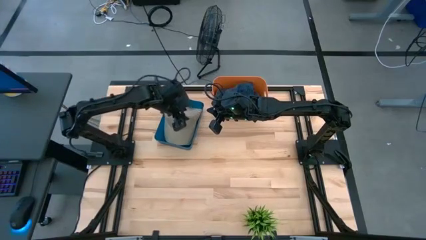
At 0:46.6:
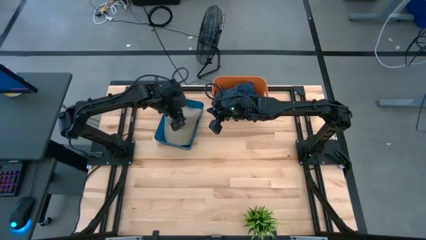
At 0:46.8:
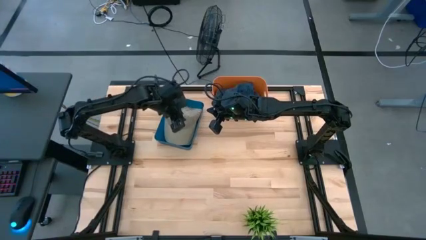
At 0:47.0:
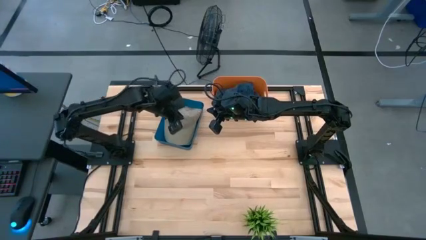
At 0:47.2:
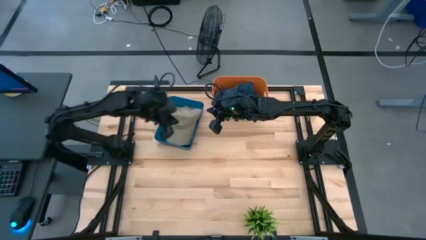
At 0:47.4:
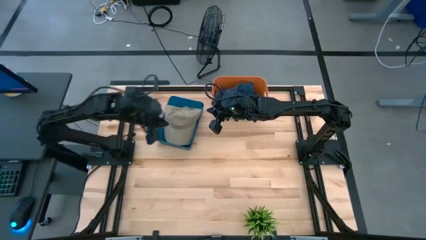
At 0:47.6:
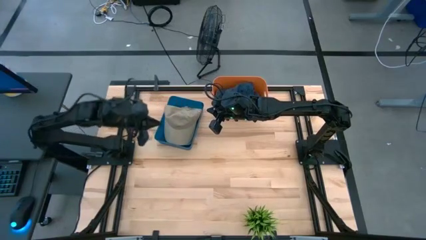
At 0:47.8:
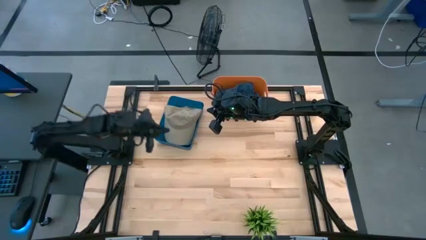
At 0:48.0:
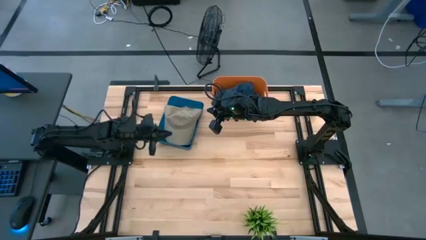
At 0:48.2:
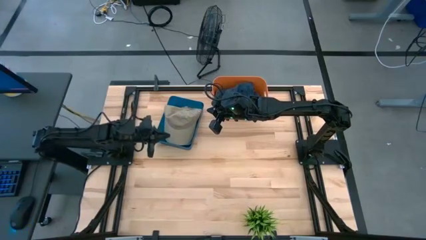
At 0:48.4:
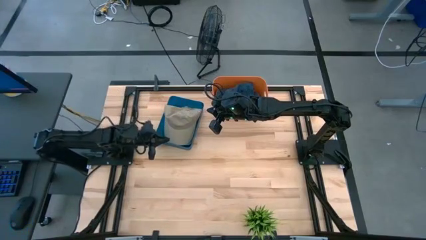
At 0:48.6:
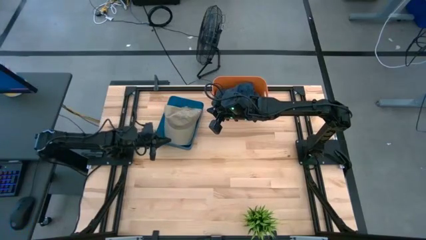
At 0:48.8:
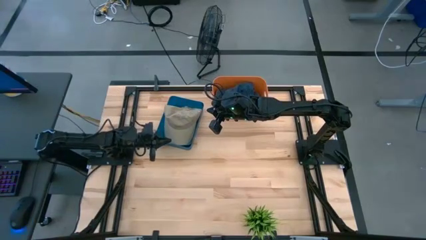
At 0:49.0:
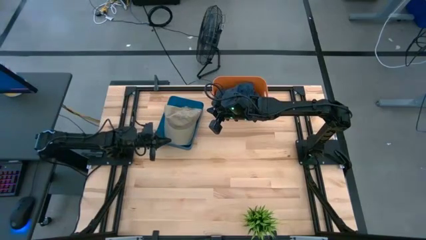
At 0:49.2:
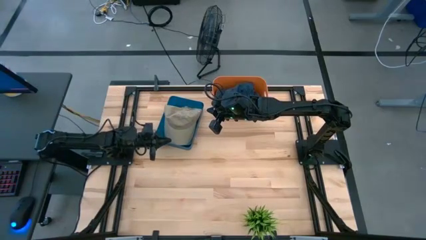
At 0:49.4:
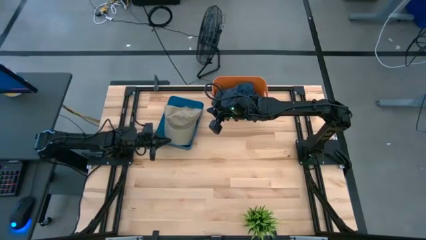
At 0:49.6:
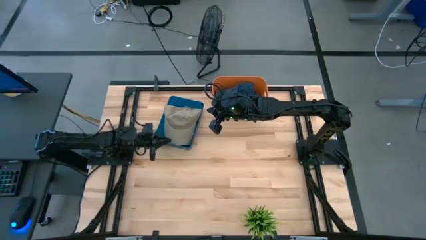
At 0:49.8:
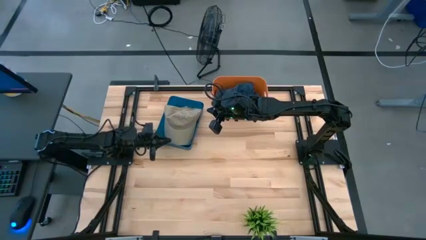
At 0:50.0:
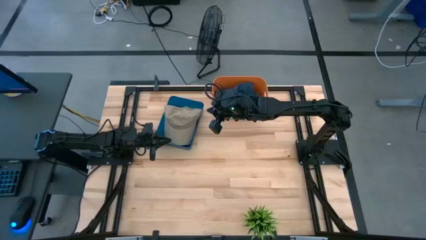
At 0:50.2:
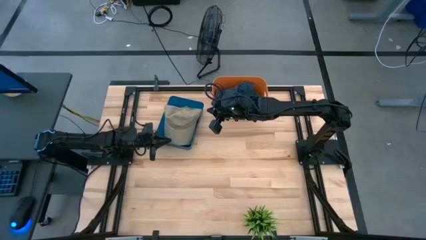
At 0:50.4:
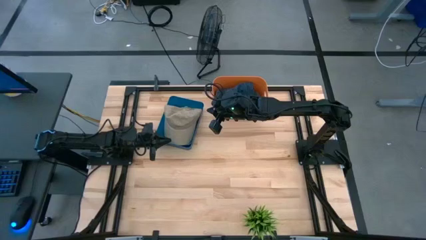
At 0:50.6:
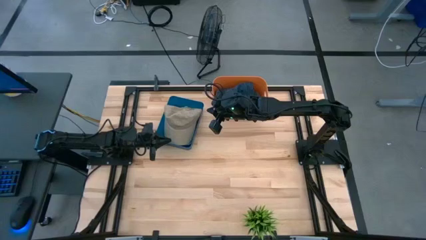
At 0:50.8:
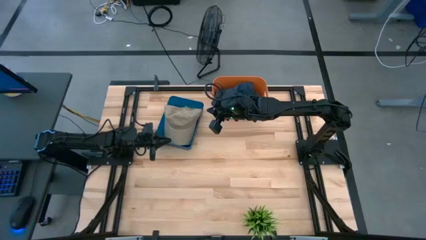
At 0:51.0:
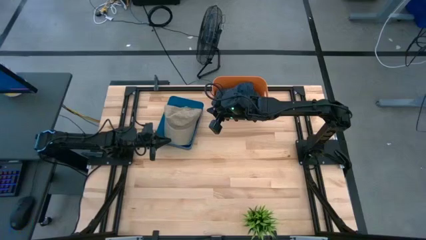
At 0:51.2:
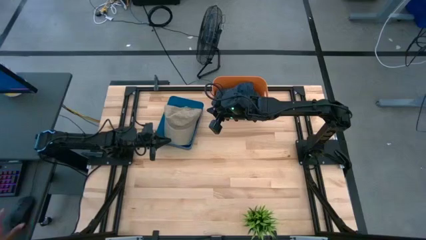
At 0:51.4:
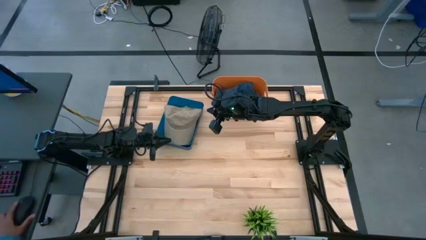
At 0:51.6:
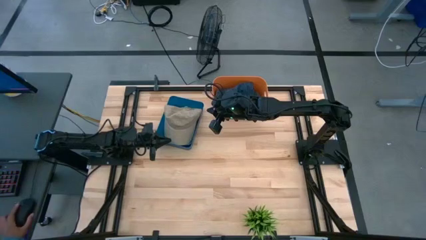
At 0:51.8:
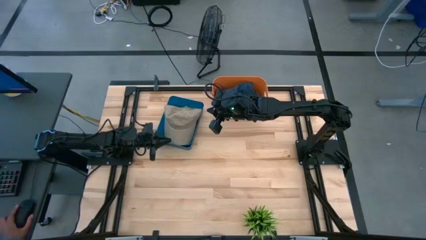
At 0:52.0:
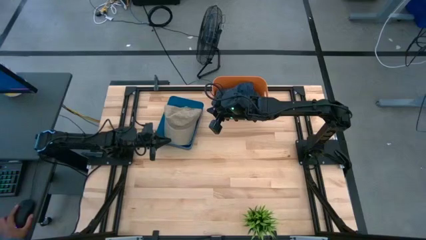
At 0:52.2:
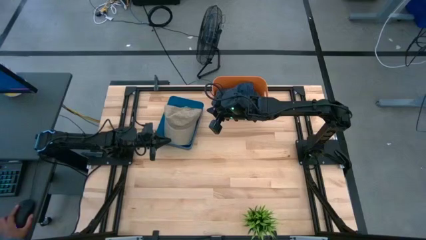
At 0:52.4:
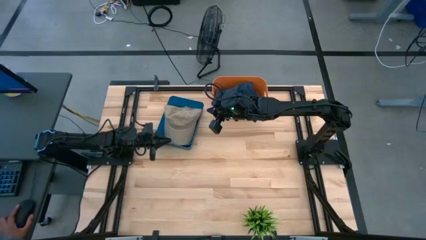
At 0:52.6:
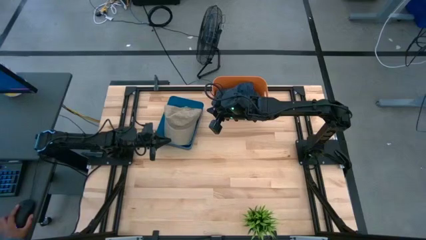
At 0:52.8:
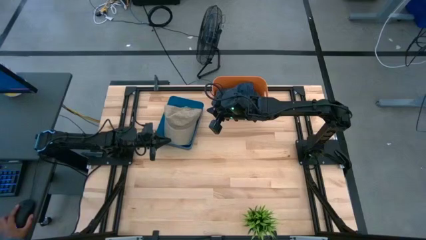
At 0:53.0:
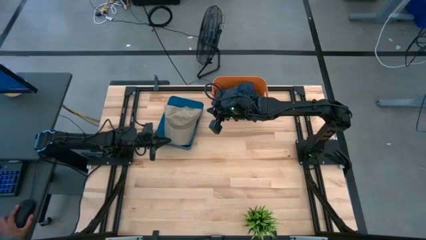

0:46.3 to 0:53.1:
Task: Pick & Place hat
Return to Home Position

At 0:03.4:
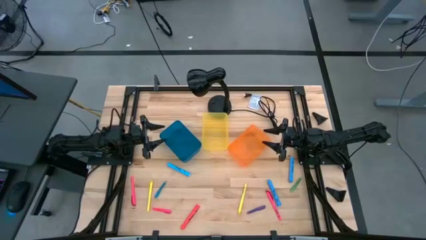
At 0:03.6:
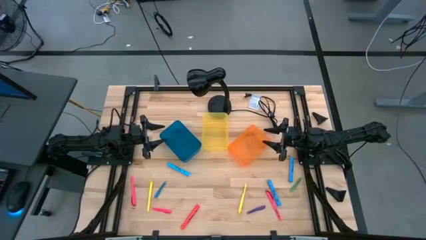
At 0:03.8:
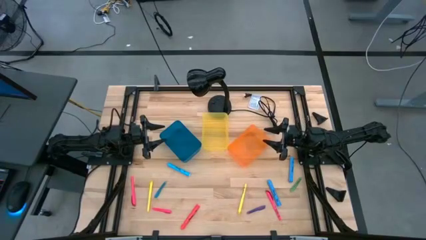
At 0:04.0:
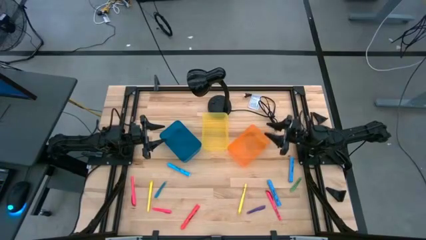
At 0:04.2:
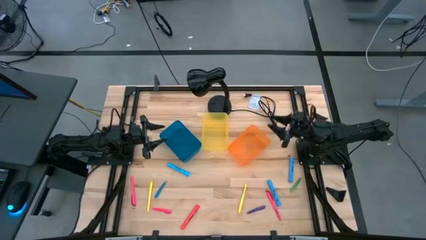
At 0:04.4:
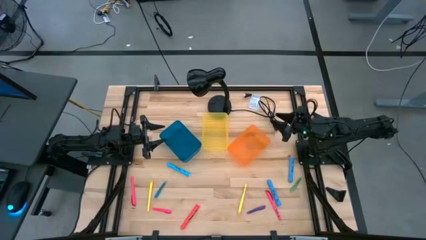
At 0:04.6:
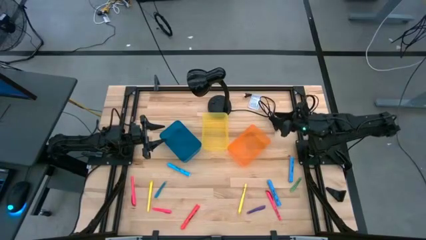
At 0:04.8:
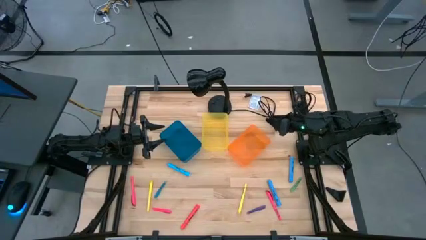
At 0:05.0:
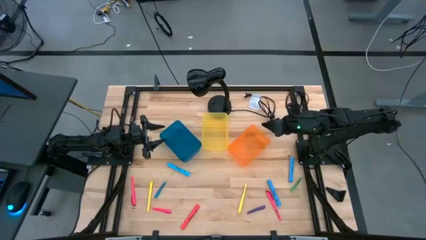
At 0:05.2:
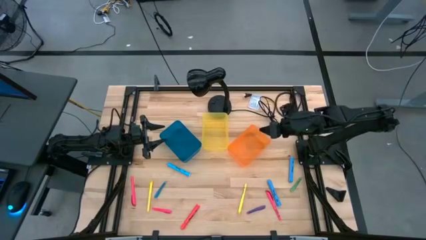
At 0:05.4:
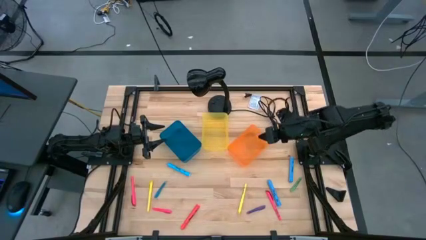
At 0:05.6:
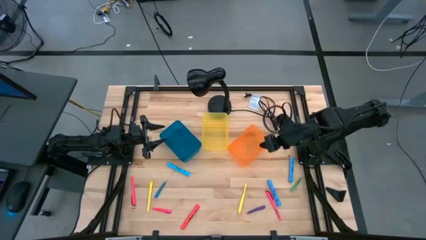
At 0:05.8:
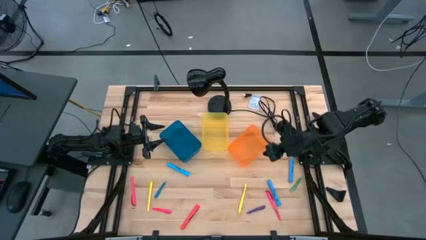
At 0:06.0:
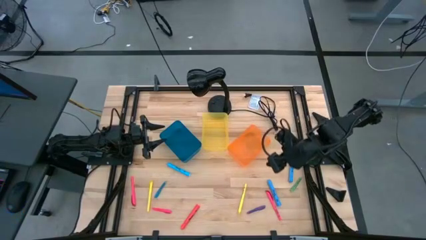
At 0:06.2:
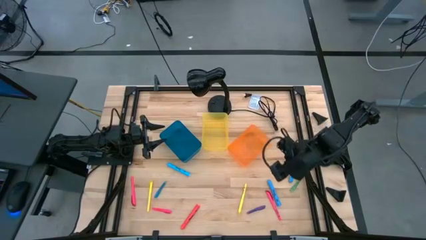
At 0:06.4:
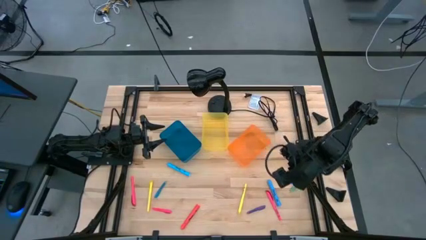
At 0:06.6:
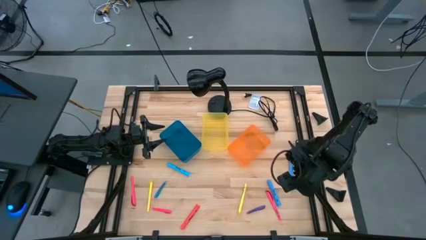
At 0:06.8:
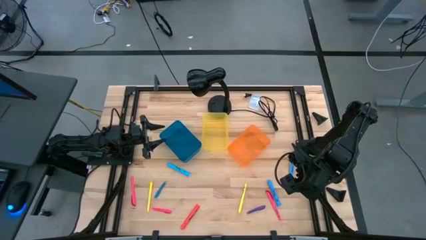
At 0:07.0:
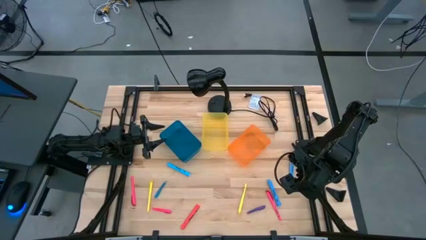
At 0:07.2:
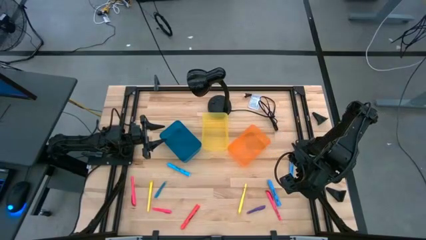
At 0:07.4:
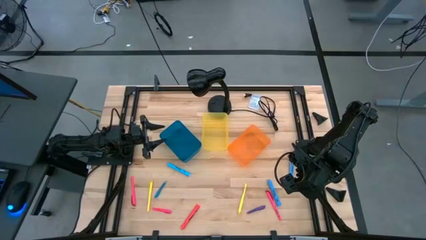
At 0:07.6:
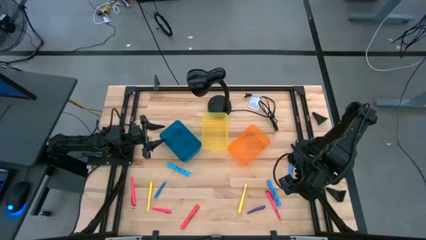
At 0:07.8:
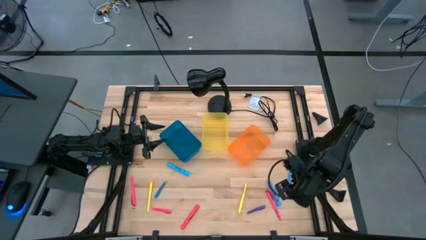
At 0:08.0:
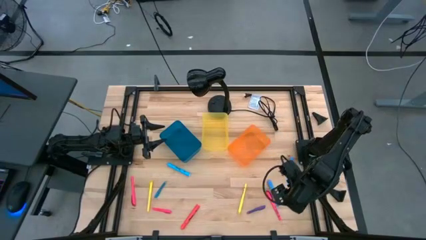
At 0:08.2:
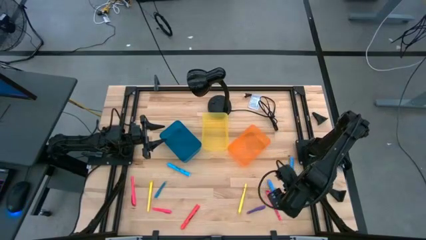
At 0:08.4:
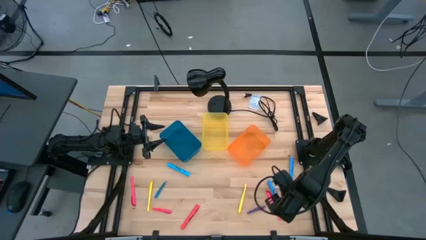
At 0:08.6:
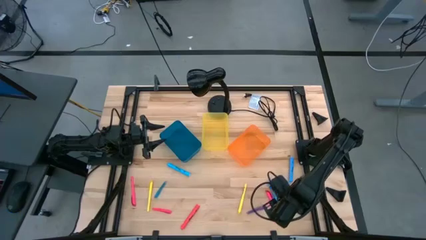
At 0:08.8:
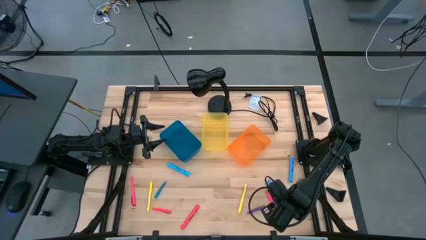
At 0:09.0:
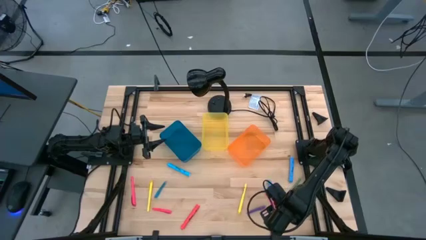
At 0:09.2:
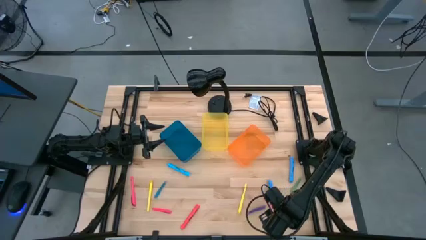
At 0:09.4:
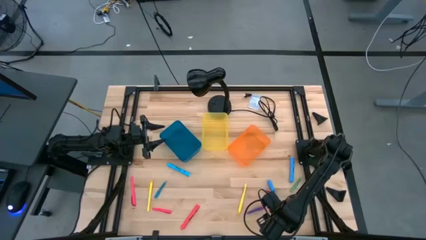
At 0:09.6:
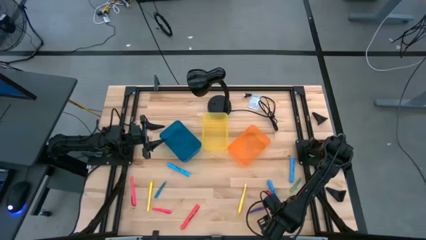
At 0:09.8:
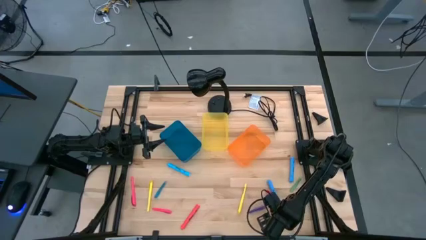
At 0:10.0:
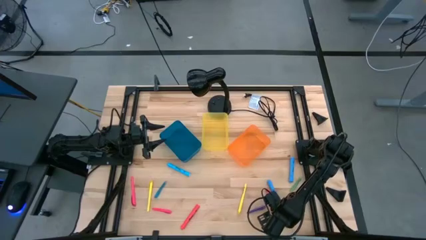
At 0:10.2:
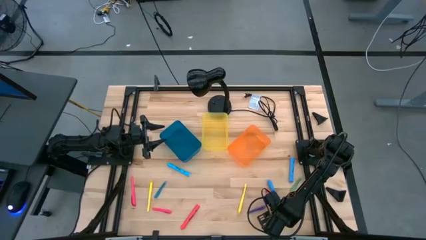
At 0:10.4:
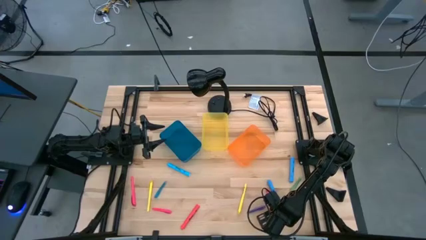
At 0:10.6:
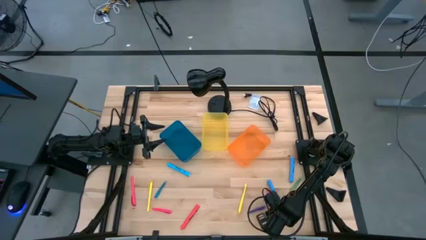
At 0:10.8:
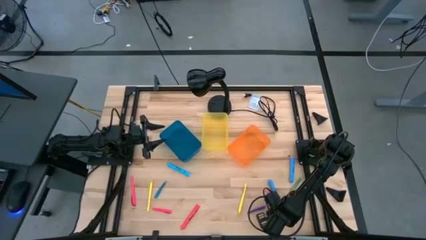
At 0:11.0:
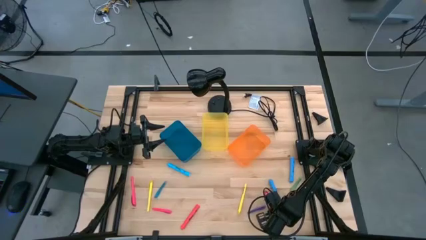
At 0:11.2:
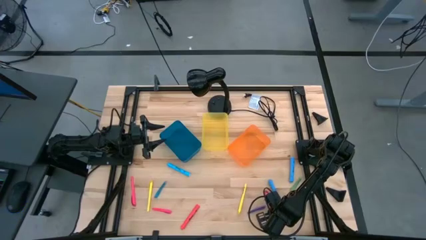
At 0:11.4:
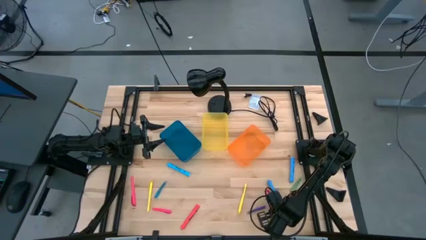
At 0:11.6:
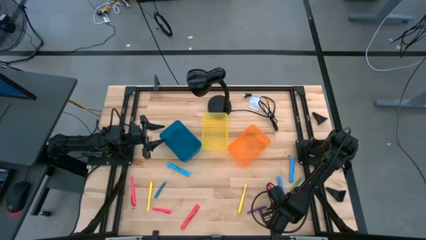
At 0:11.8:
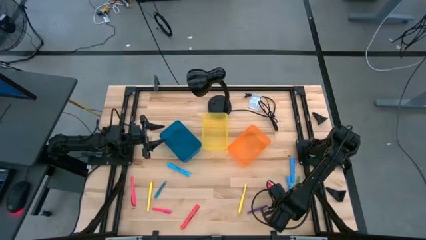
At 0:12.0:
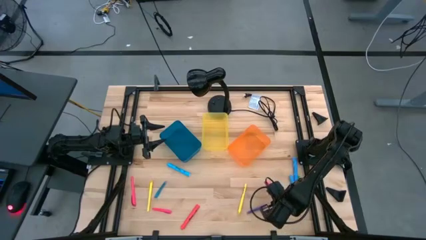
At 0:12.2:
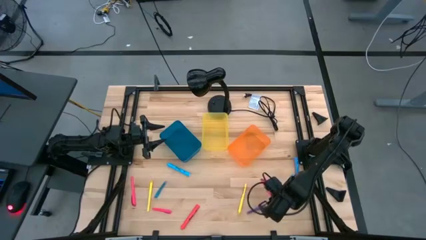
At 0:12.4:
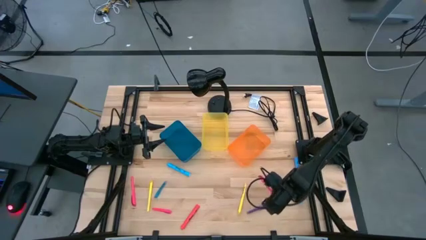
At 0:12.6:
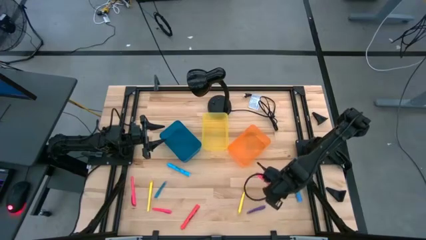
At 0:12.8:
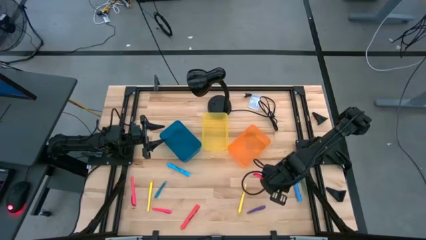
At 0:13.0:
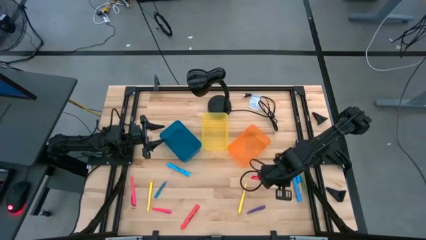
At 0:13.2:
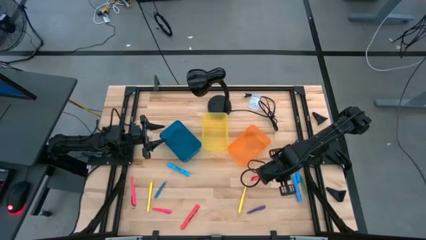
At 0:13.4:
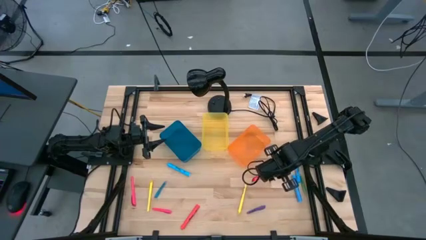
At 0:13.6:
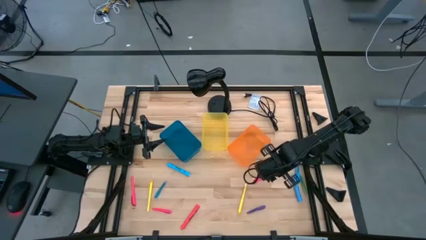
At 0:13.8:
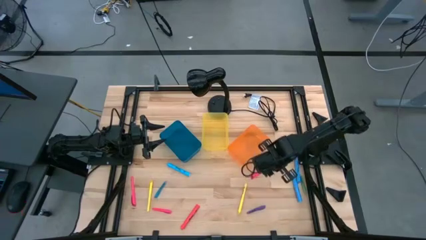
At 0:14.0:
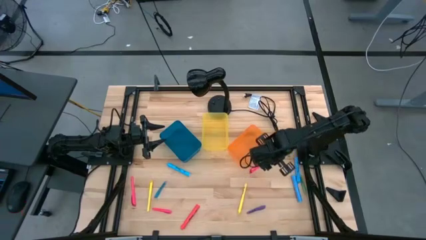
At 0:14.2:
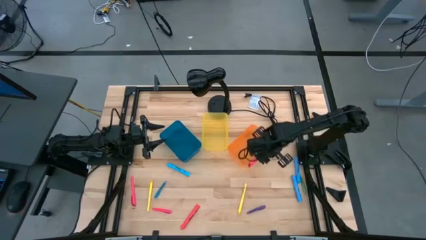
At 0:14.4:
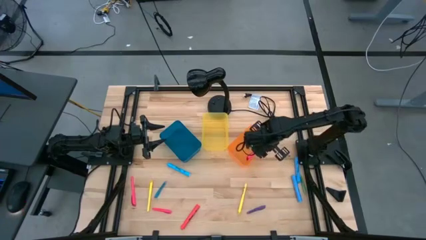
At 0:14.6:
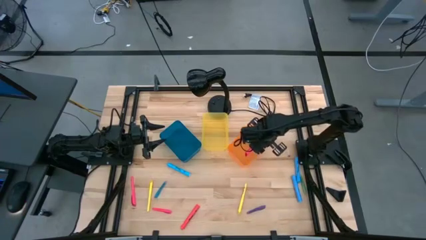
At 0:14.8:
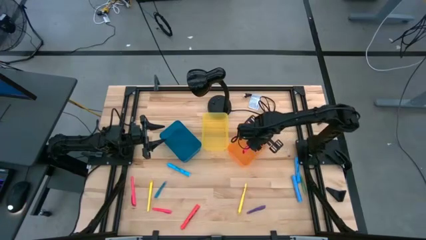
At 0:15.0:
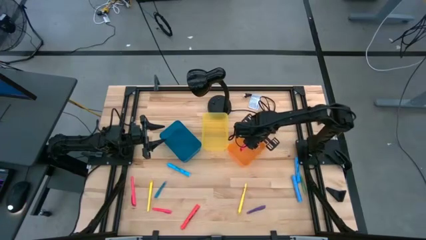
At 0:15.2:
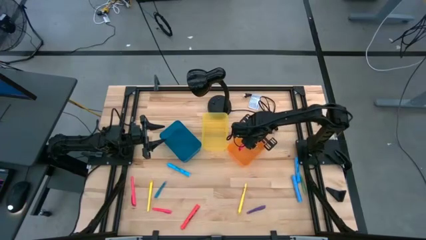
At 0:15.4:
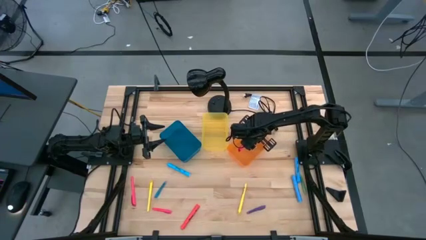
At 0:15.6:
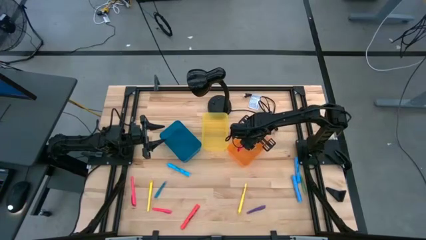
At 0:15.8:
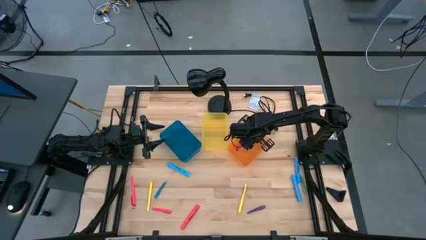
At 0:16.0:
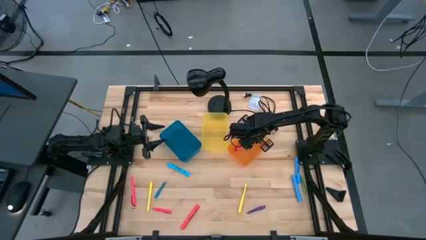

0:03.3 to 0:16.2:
Task: Pick & Place Markers
Put the right pink pen into the orange bin
